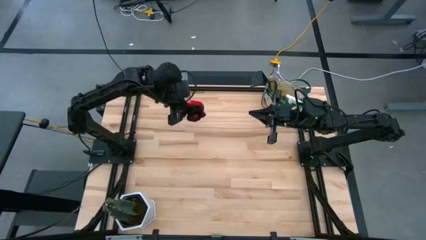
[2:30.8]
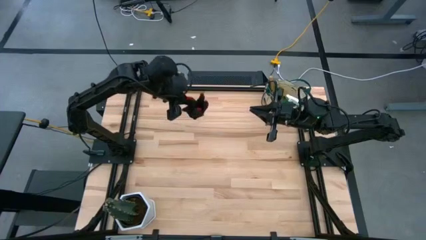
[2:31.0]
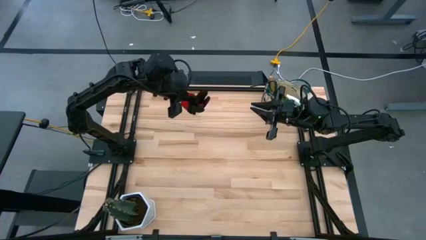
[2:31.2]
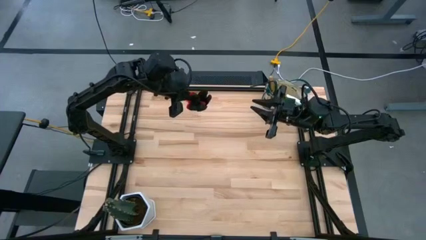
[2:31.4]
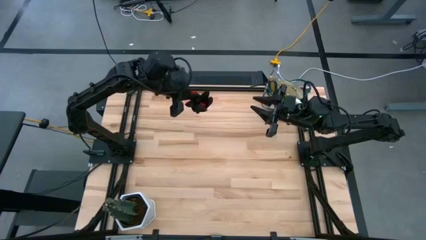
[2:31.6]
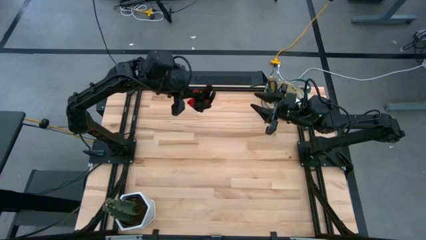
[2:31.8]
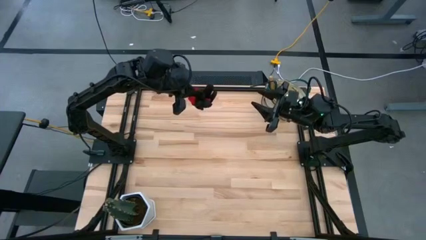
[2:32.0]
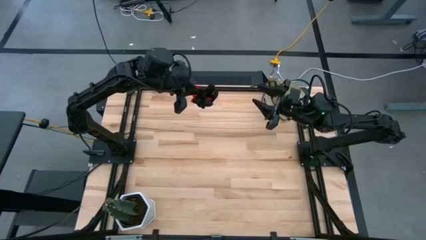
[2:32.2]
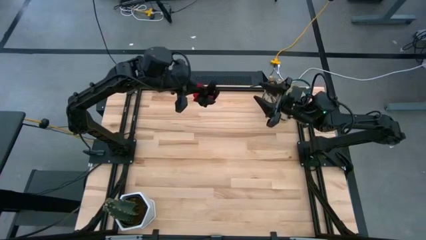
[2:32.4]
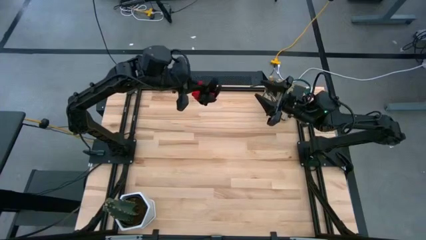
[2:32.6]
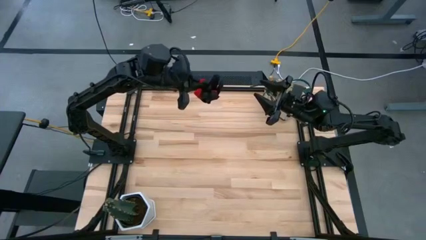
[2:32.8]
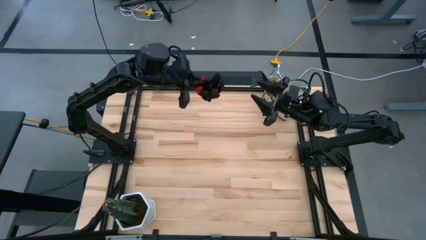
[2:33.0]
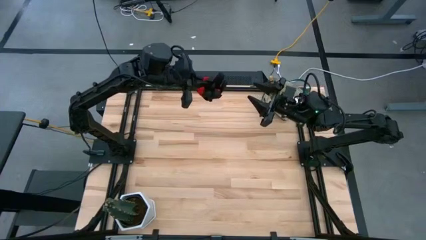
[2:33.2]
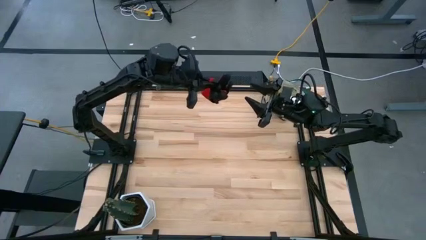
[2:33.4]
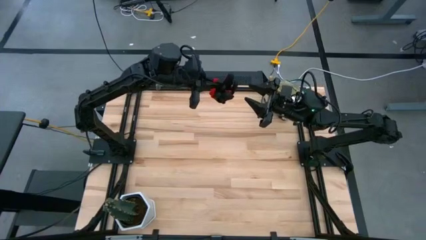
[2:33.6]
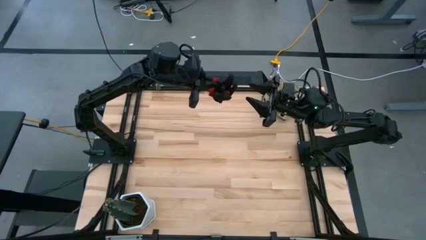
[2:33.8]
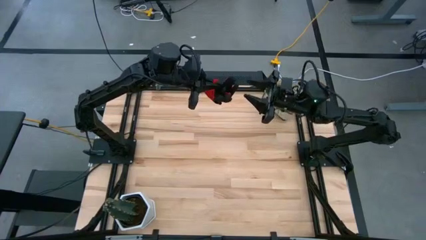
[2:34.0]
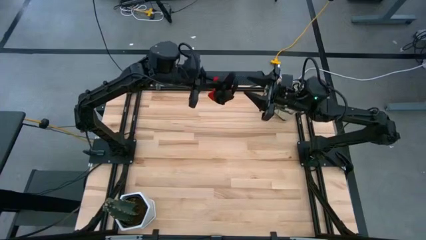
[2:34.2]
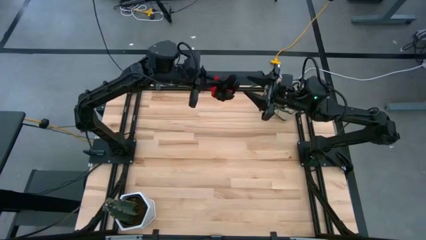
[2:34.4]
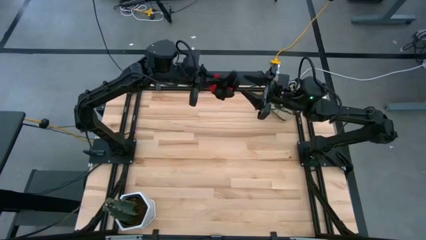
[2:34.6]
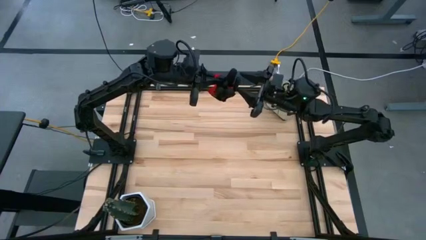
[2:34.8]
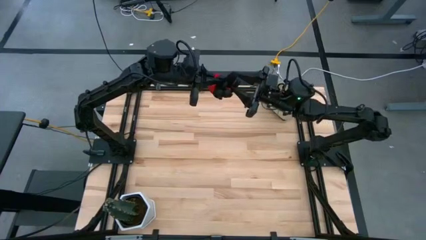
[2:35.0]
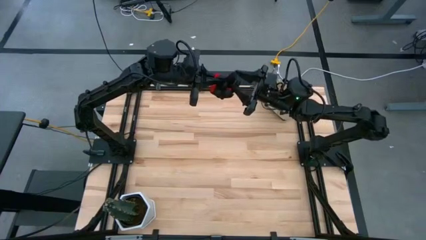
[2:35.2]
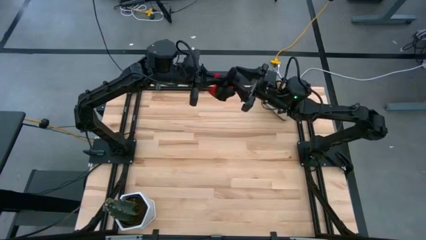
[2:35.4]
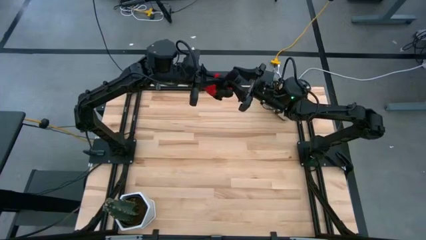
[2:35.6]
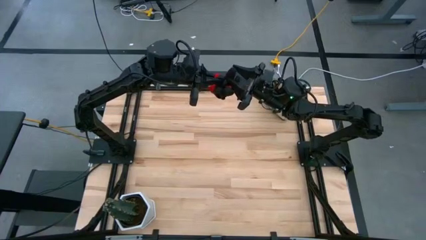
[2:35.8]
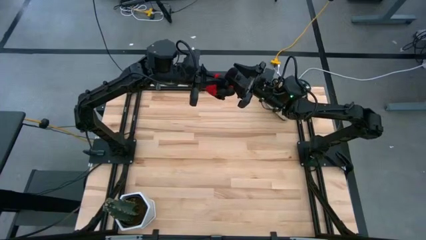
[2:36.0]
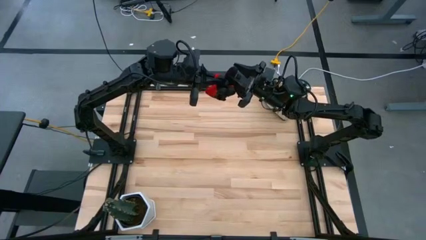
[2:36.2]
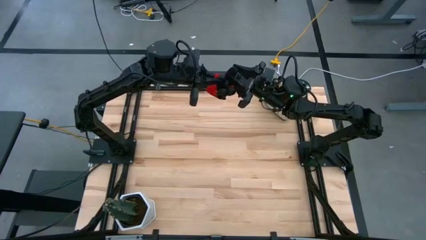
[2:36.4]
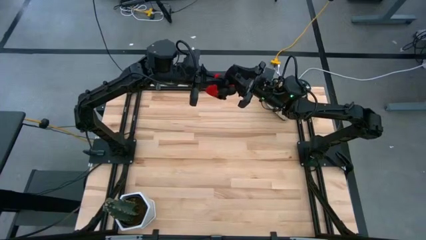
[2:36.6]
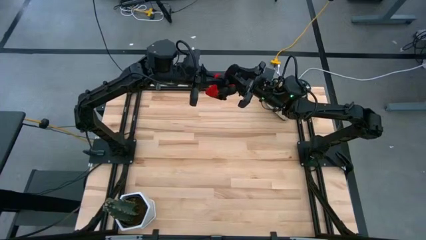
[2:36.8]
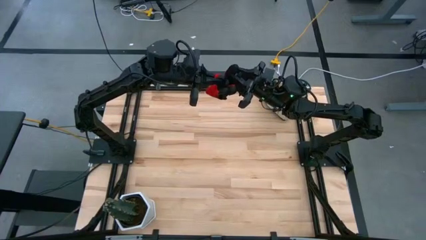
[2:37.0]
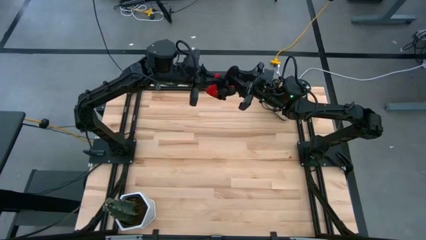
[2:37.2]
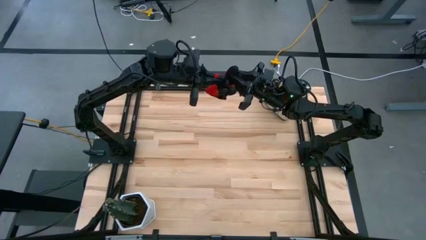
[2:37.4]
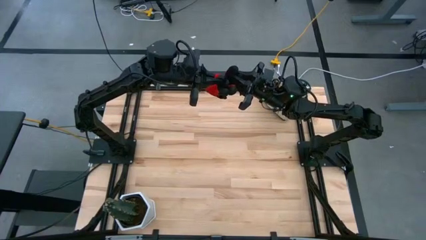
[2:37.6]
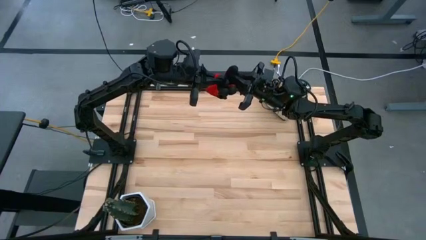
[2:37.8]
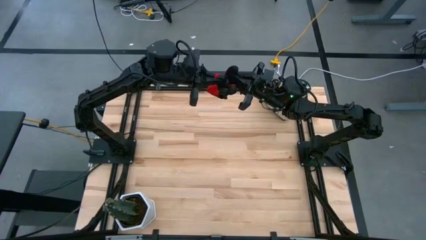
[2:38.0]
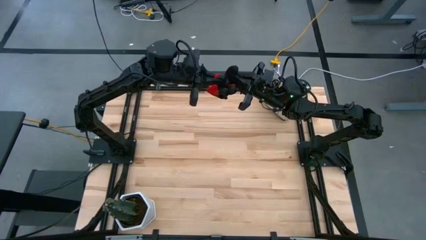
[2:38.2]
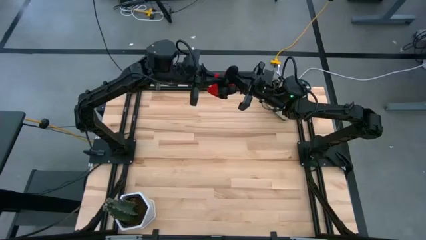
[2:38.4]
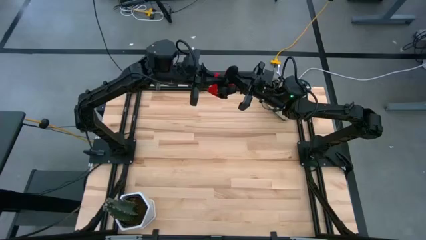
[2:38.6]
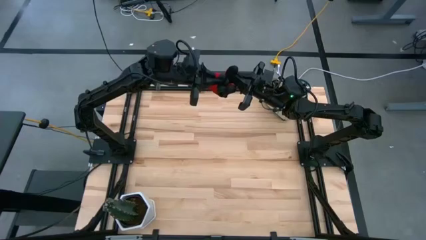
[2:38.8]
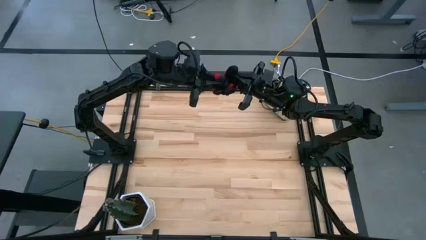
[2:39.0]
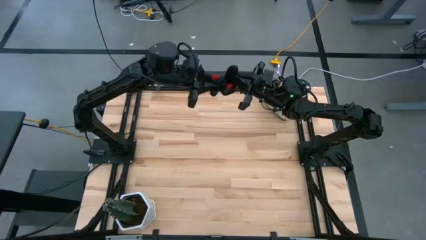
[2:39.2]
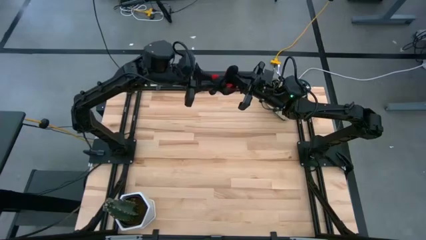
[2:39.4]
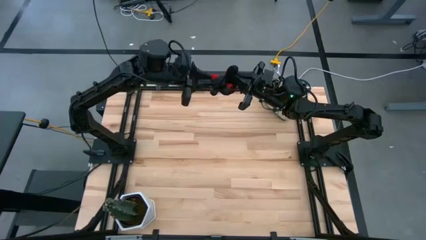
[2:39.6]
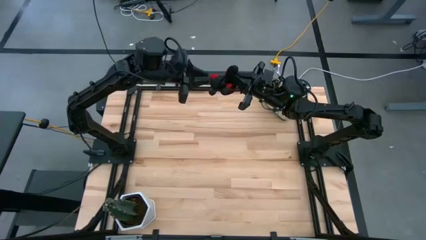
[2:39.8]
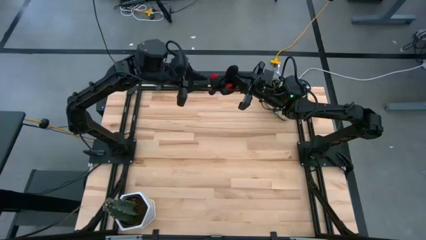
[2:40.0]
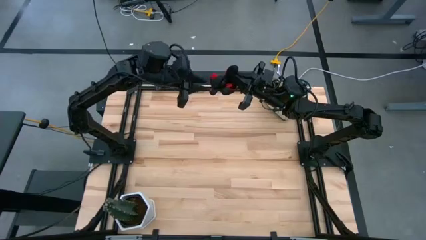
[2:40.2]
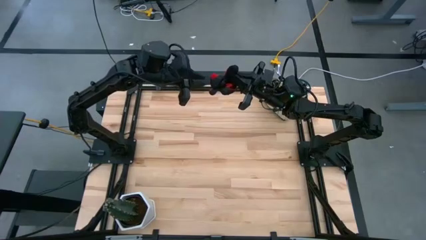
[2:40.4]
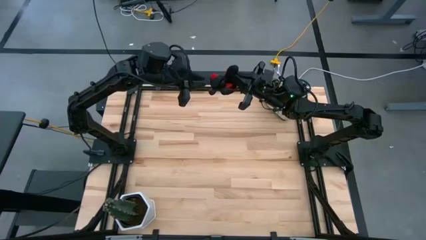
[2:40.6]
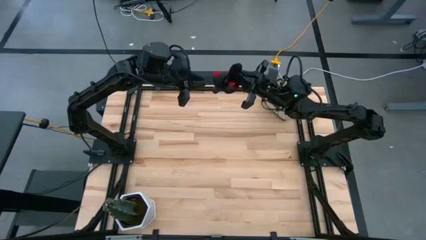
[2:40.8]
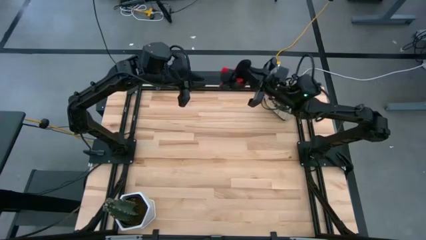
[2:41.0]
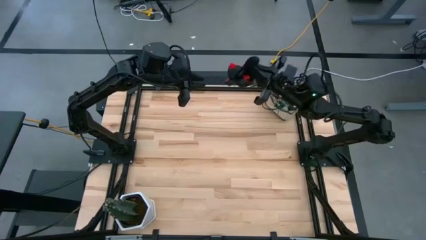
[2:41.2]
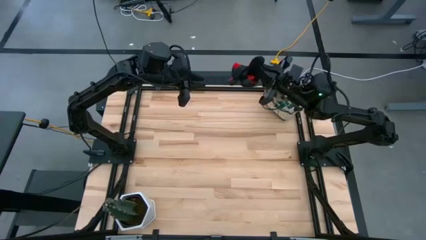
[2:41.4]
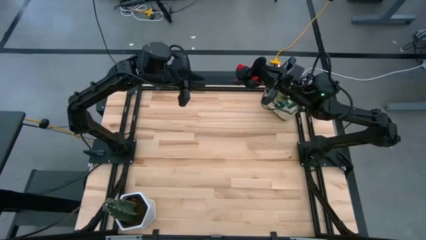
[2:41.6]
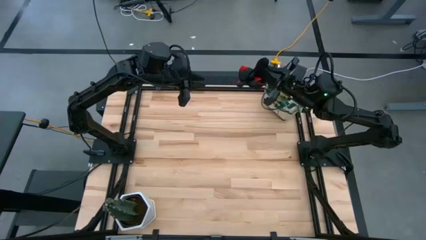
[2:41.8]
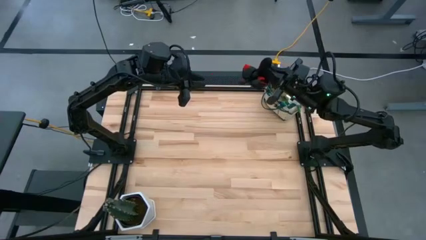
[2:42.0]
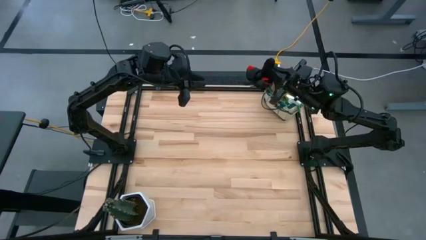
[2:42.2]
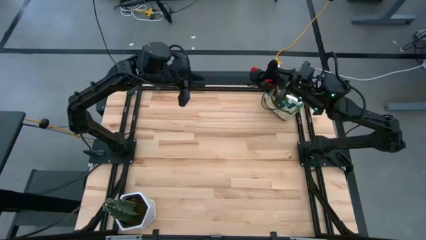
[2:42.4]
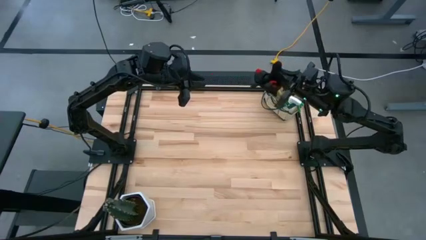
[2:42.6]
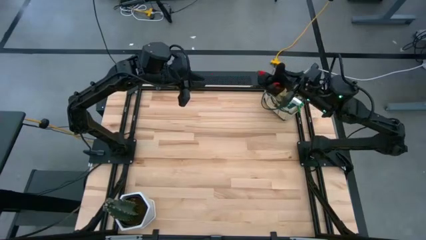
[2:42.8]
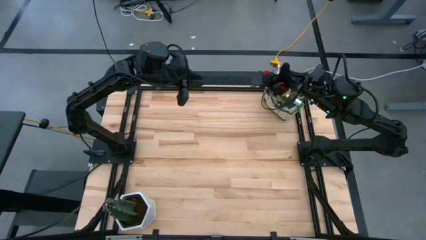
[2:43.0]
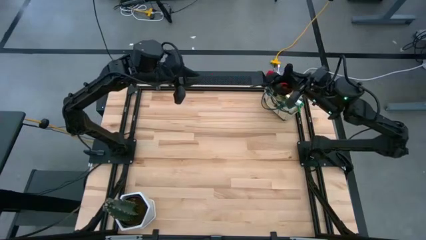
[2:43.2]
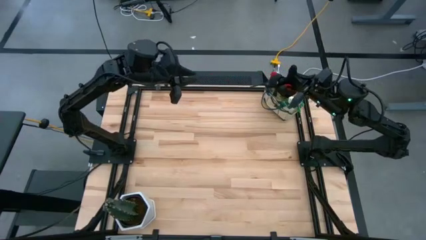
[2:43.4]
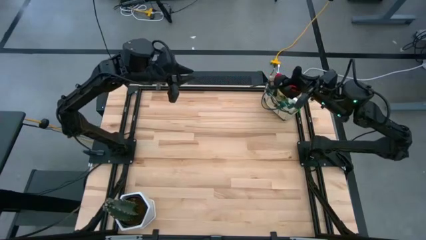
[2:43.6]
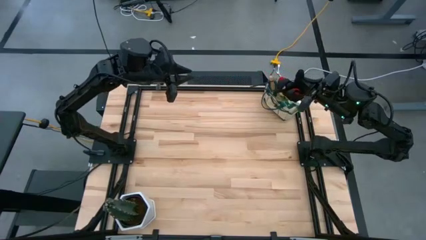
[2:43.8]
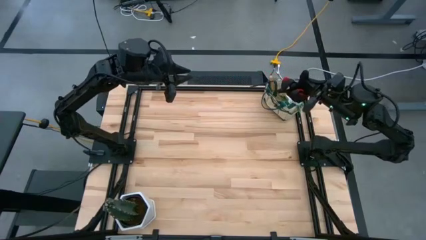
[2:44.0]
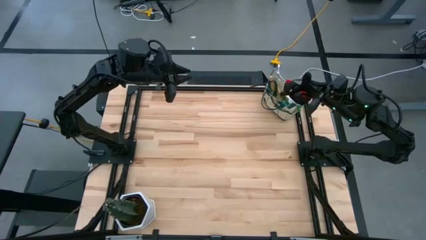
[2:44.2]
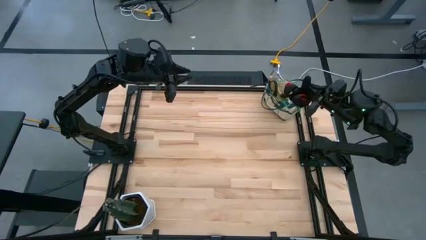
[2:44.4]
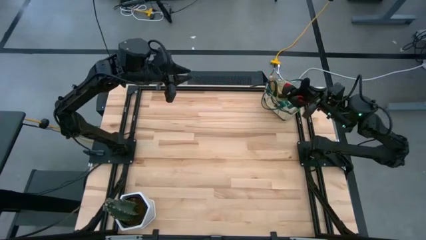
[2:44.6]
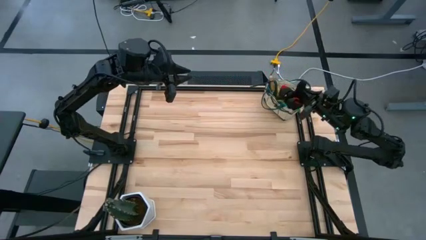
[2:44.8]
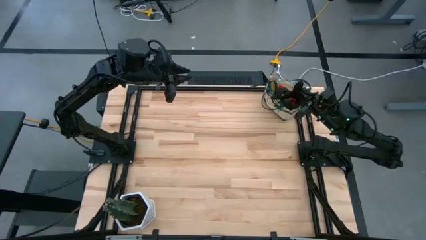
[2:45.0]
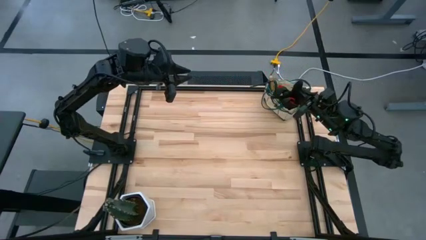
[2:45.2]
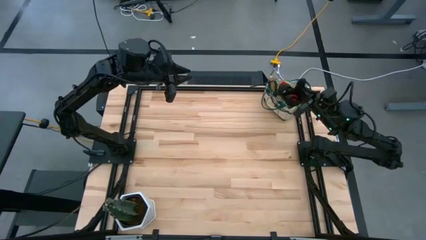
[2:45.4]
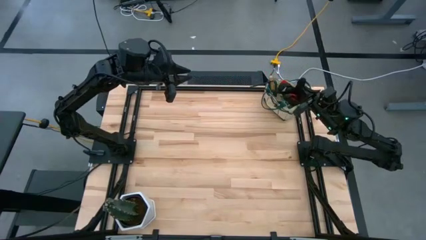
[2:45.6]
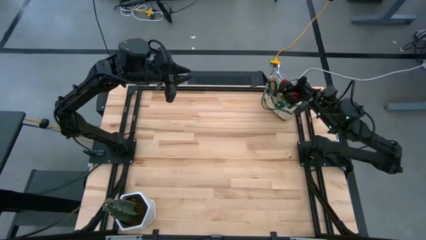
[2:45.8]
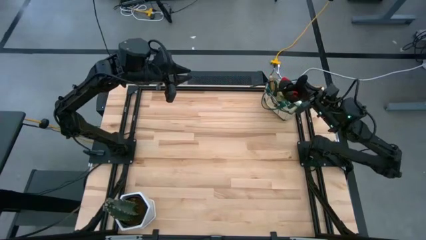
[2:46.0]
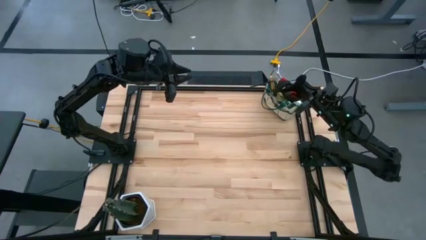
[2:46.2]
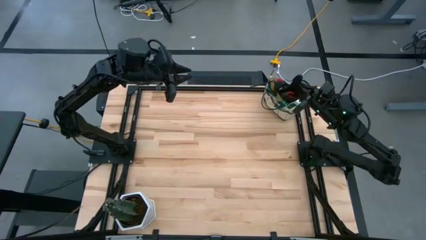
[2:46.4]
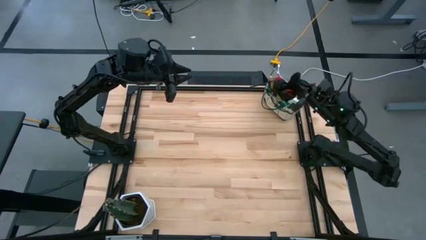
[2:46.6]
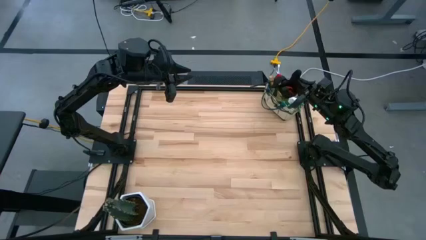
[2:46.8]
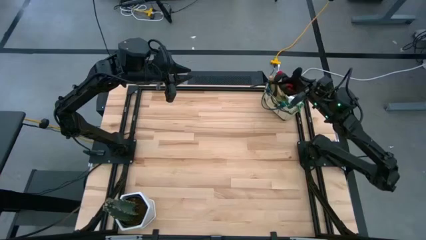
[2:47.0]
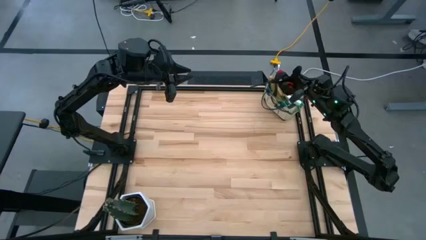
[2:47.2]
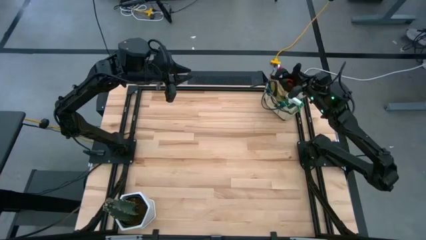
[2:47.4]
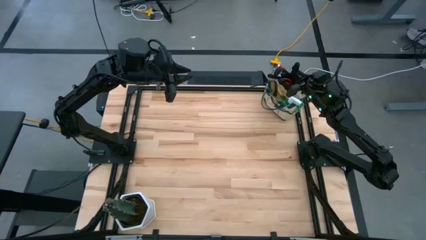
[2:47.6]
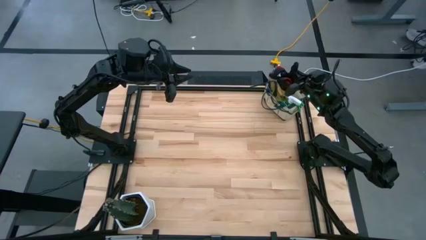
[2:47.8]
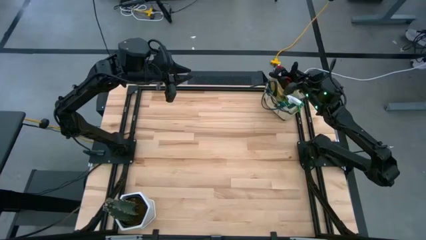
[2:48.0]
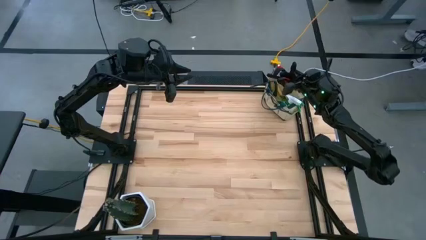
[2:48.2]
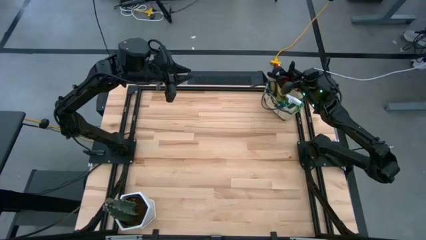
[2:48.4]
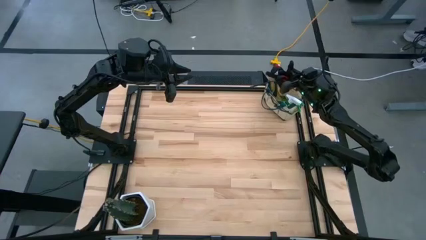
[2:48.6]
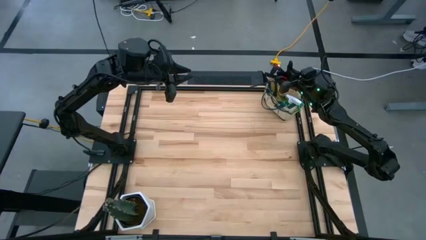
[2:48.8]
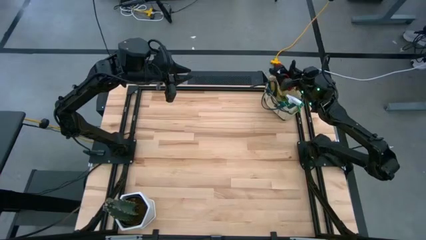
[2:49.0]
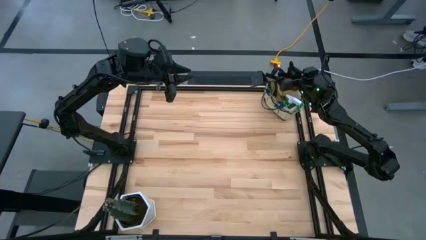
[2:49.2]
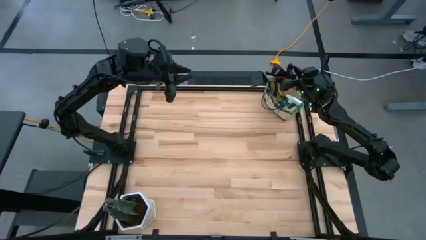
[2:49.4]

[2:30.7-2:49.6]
Task: Pick & Place Garden tools in Gardening bag
Put the red gloves scissors into the gardening bag
